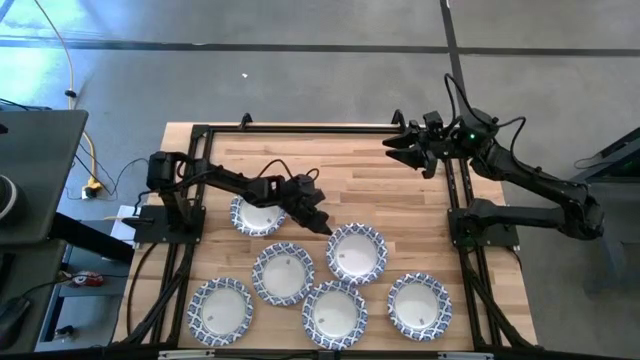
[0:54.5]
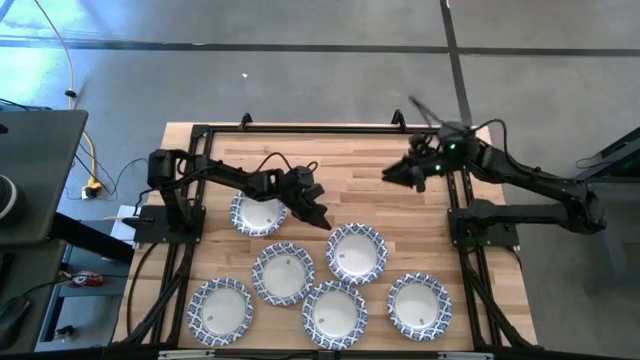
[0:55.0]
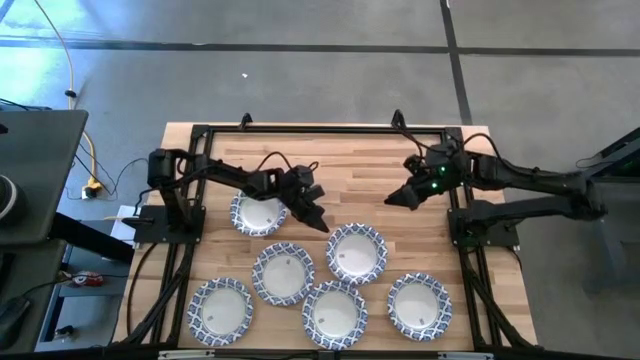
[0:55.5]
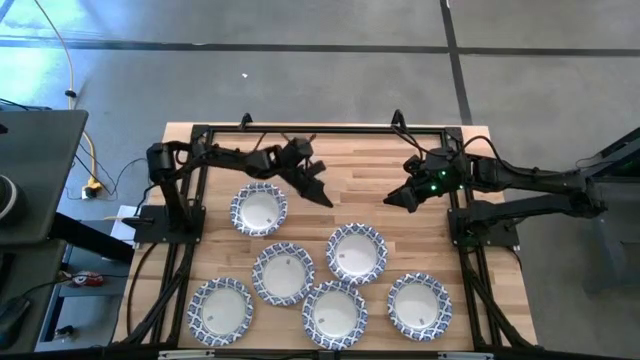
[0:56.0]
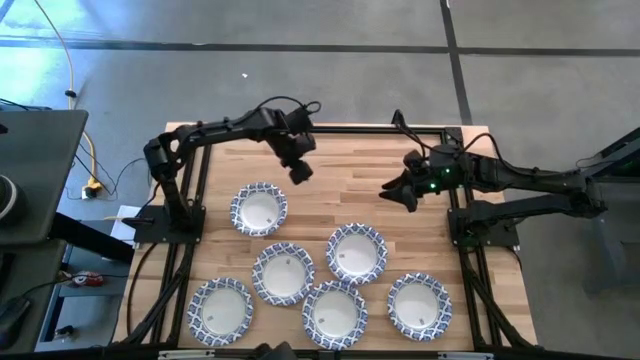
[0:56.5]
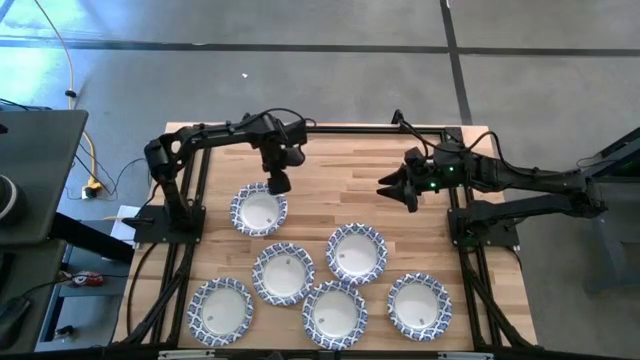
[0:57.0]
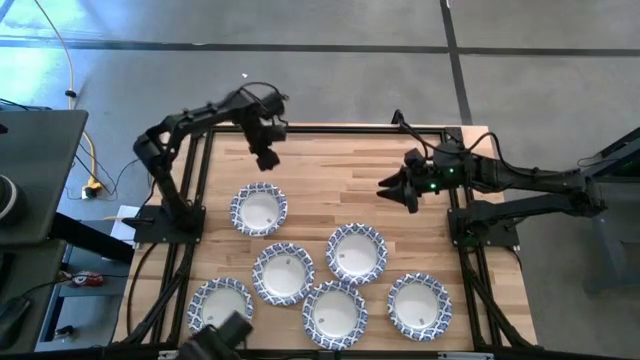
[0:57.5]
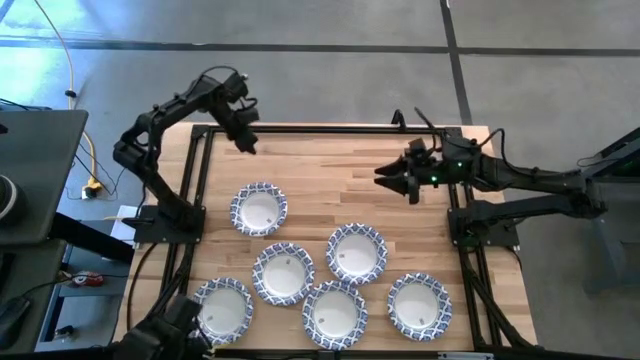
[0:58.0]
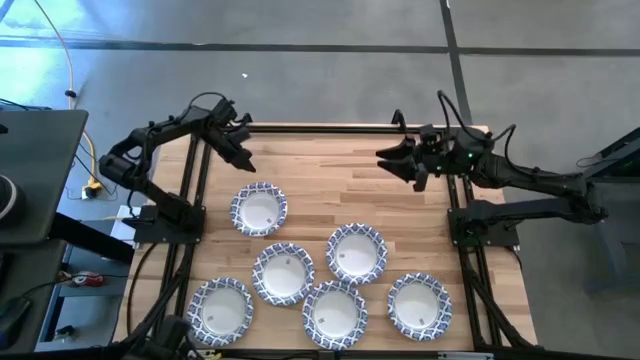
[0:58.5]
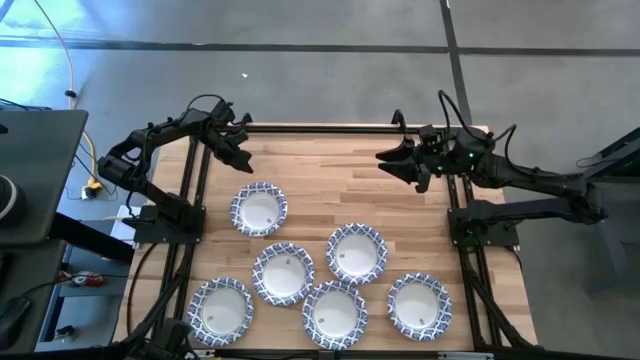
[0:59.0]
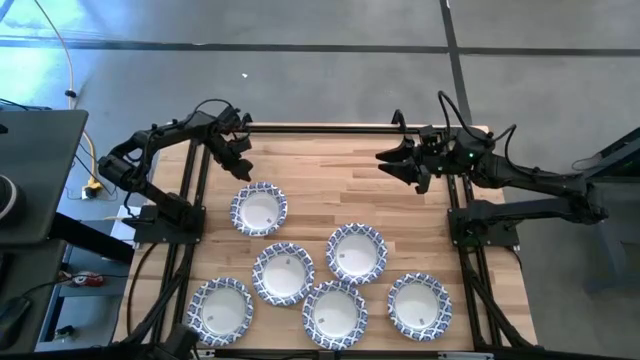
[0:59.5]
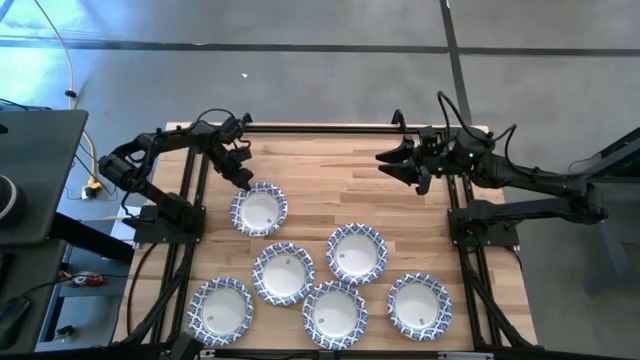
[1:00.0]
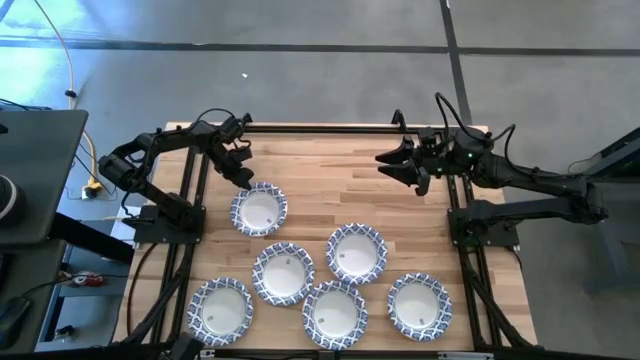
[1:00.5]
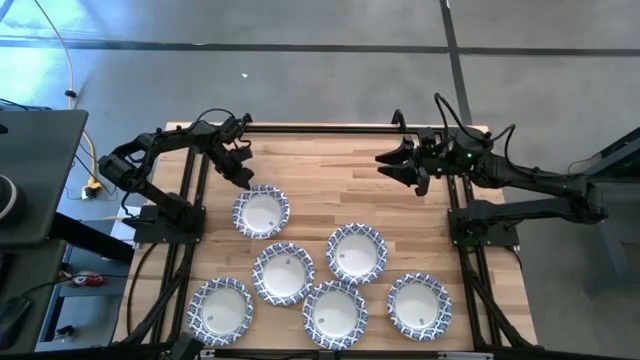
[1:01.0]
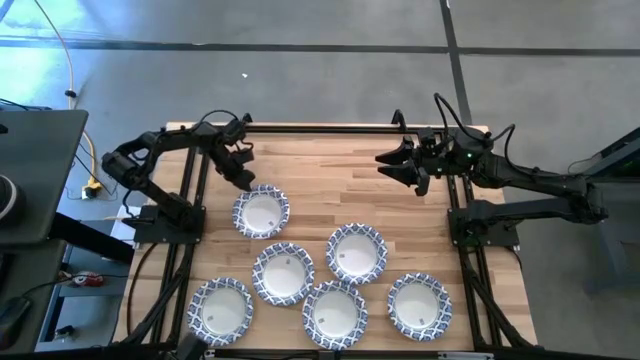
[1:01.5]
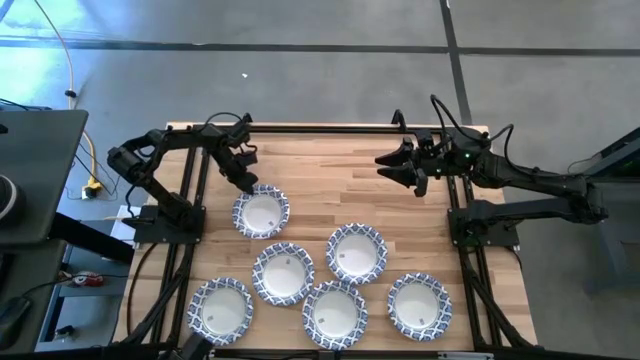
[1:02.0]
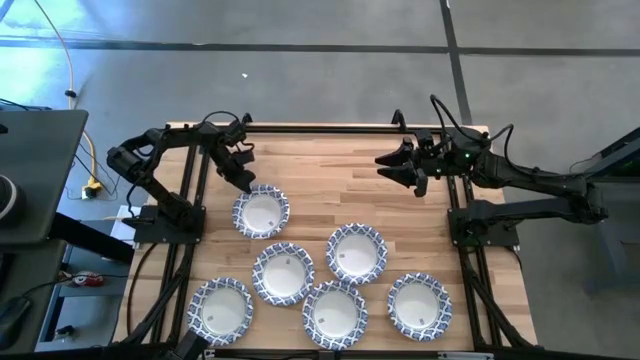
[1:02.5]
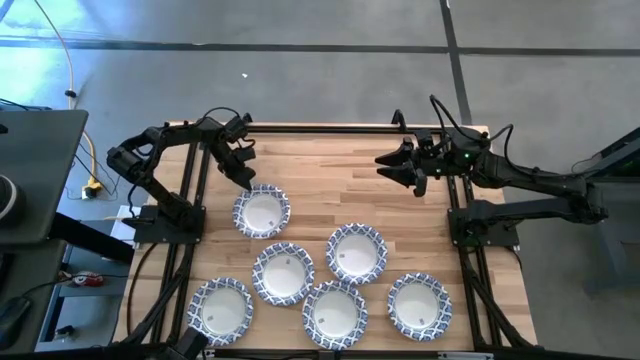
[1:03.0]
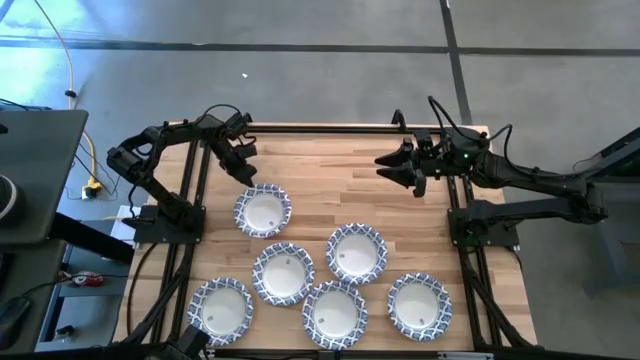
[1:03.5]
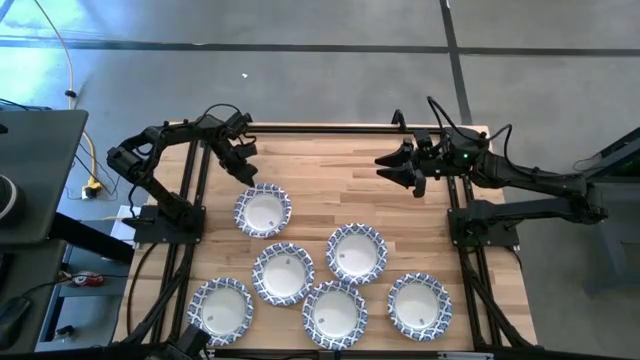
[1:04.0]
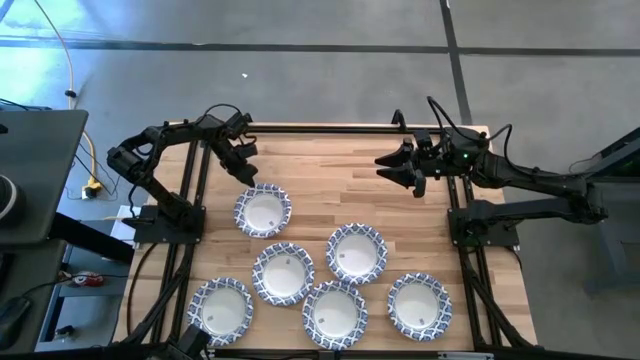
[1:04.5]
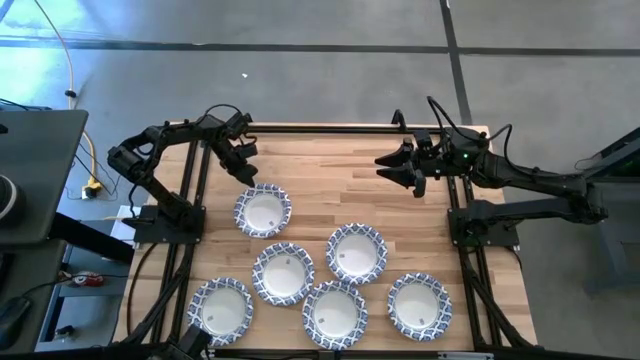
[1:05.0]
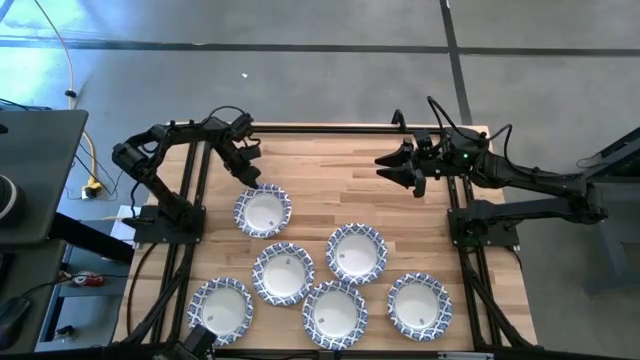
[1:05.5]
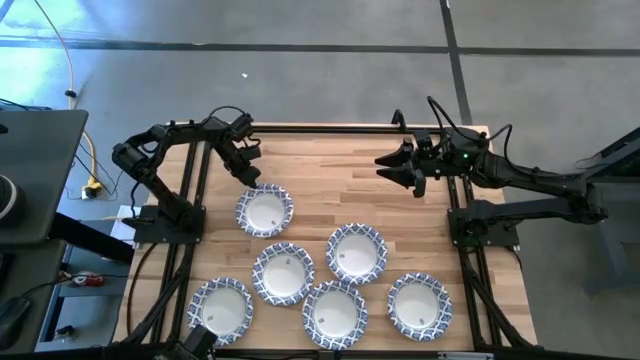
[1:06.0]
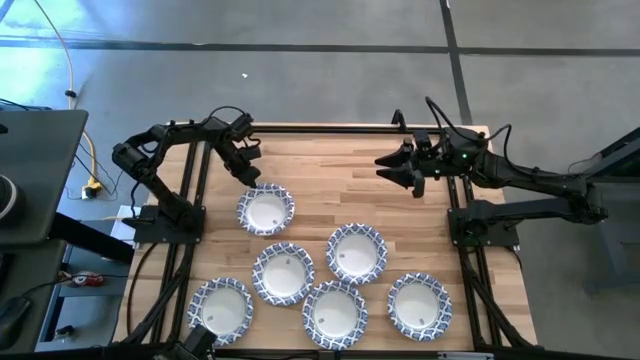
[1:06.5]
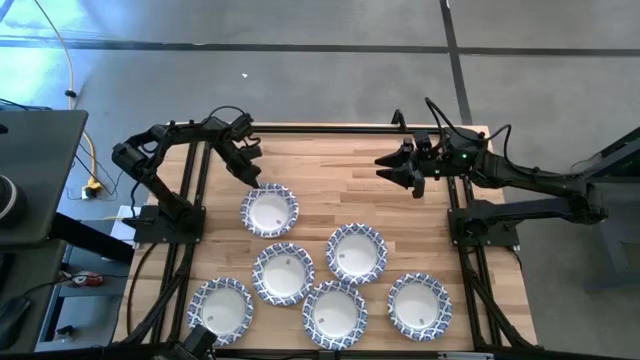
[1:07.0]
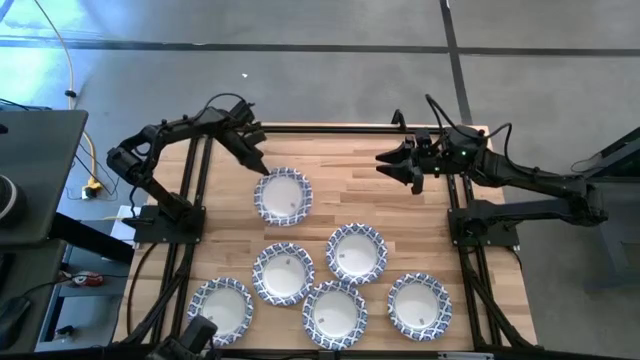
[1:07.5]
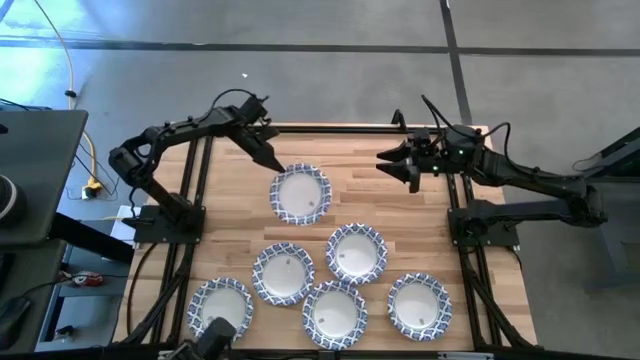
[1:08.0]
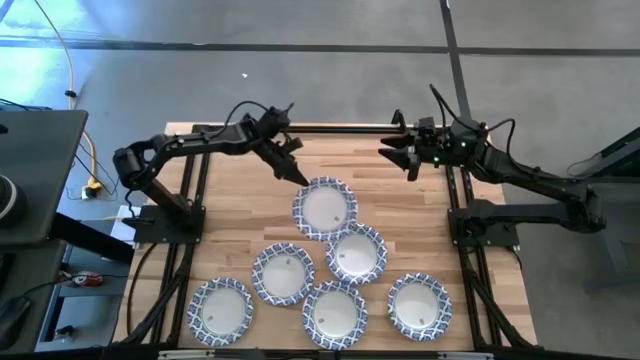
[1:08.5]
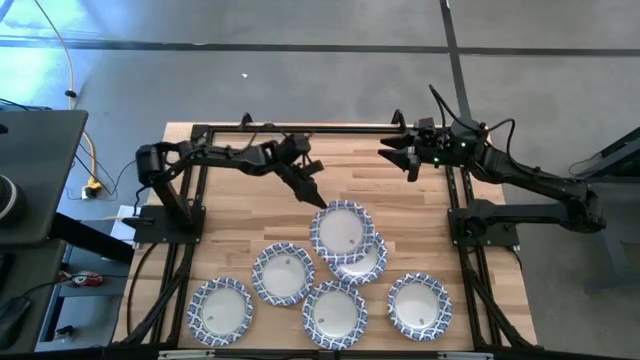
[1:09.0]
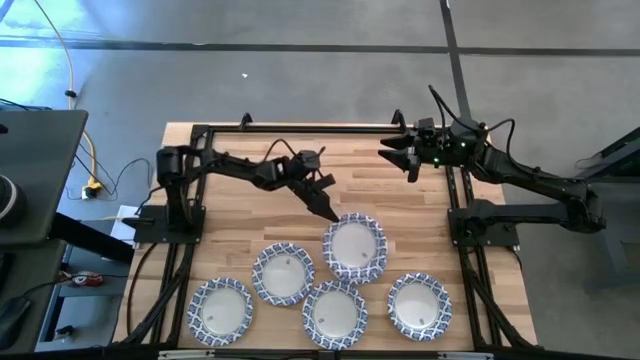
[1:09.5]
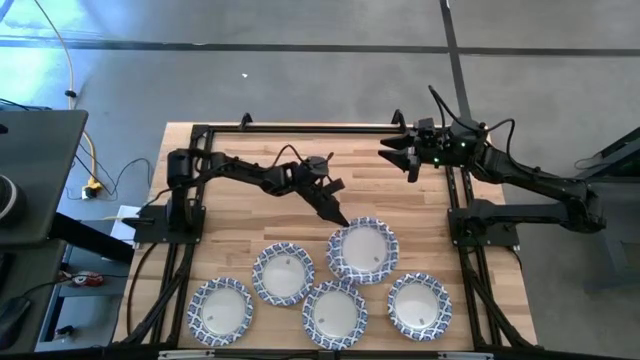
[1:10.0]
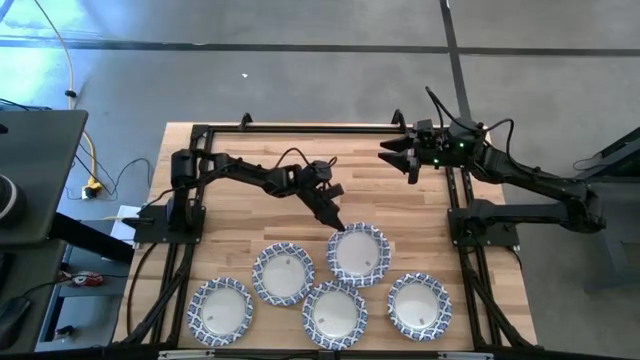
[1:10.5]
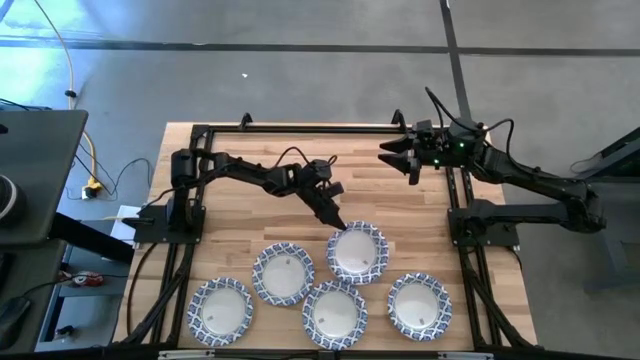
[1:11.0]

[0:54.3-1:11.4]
Task: Nest bowls inside each other
Stack the white patterned bowl on top of the other white patterned bowls

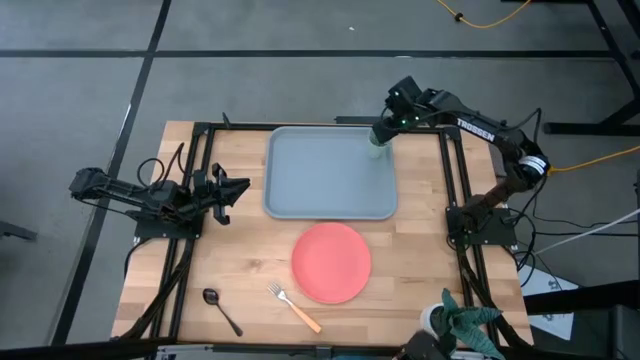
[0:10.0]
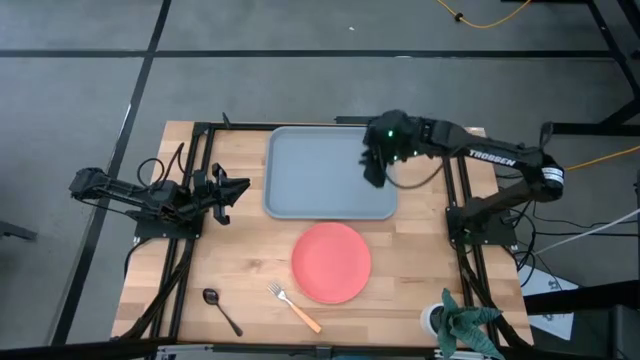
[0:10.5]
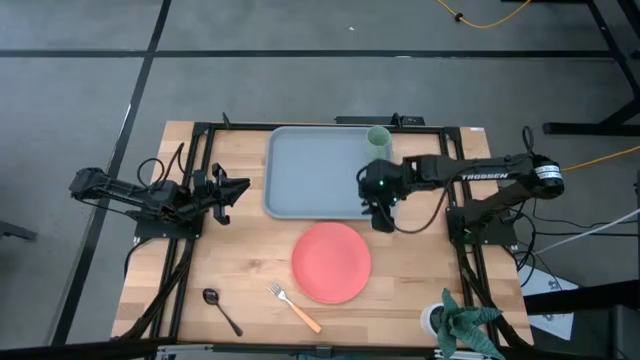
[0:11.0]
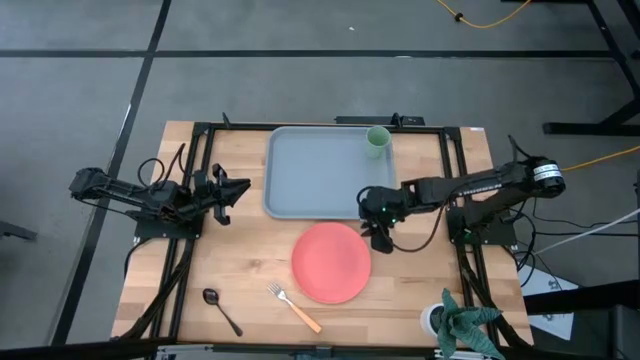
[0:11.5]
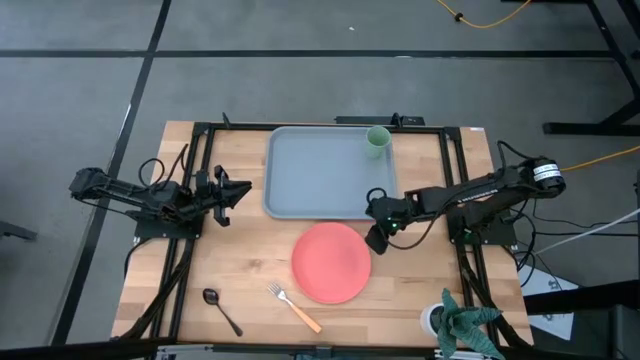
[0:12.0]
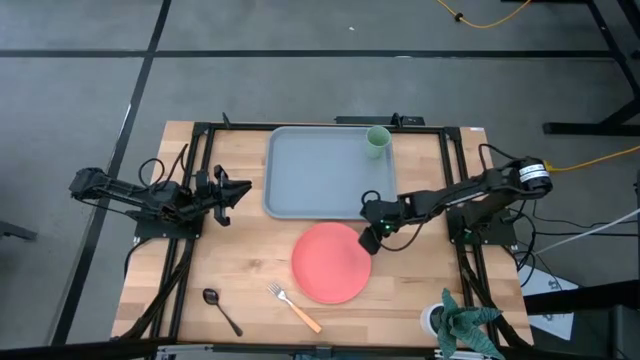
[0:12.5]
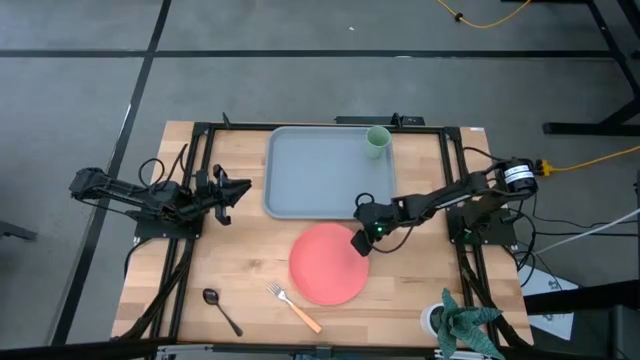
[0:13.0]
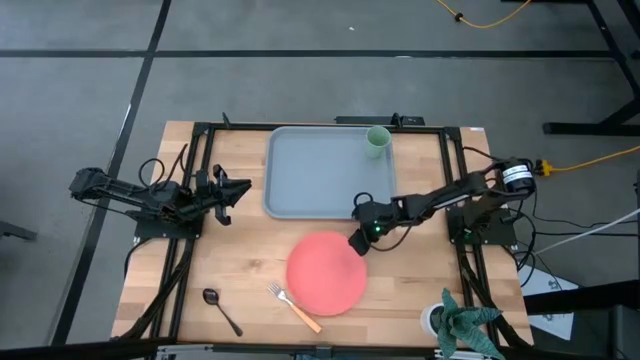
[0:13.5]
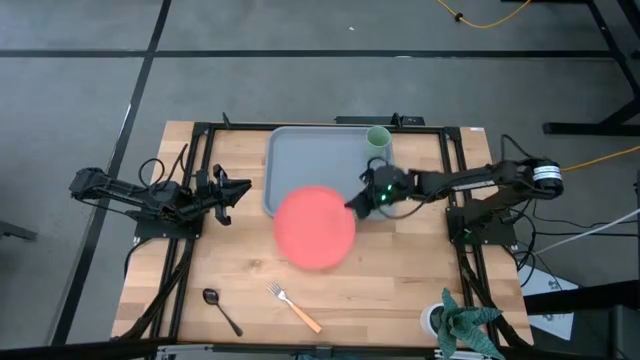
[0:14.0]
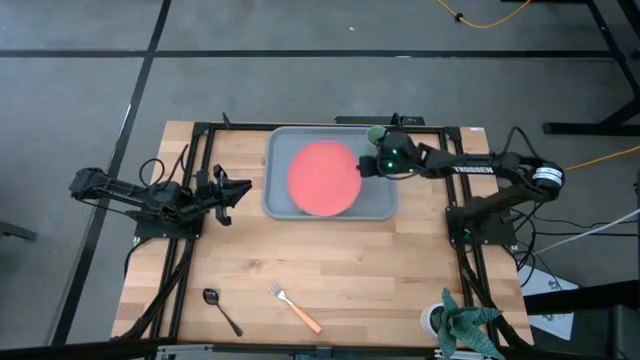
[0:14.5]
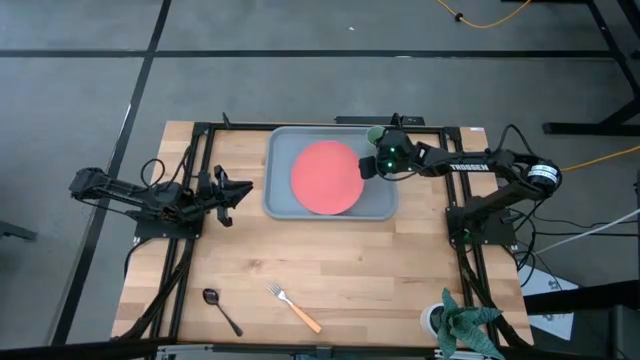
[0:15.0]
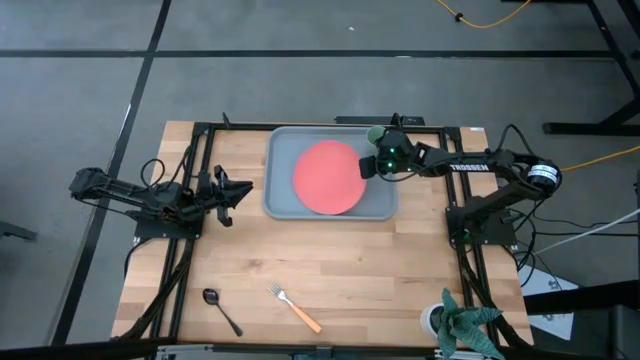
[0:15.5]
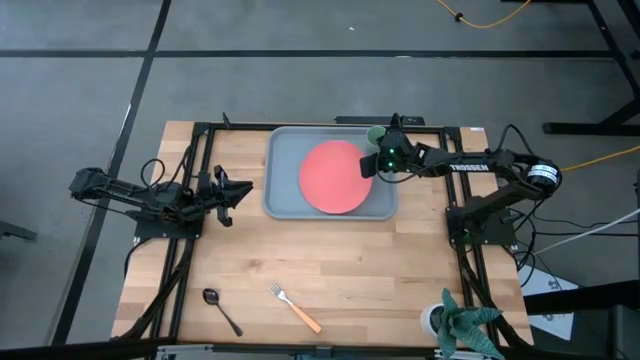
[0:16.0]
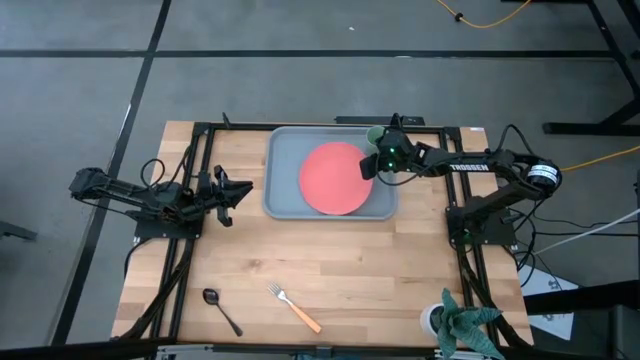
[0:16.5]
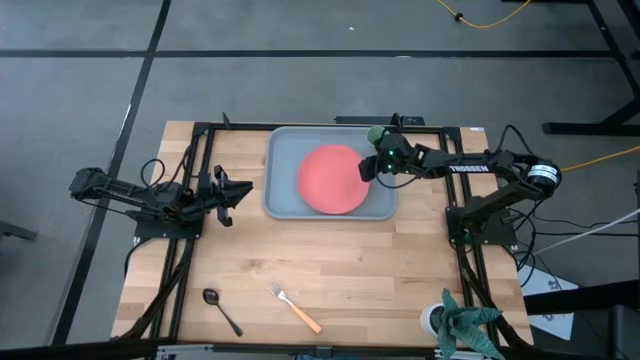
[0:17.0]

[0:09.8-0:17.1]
Task: Pick and place plate/cup/fork/spoon on tray
Put the orange plate on the blue tray on the bottom left of the green cup
